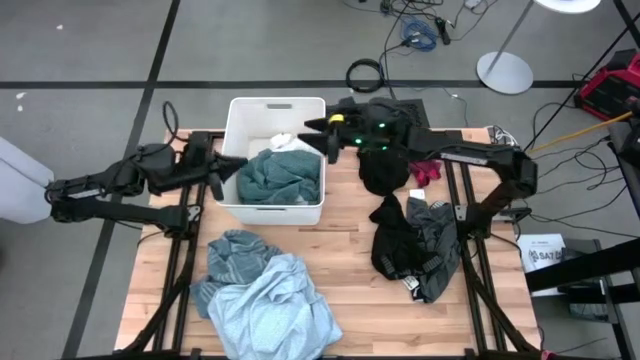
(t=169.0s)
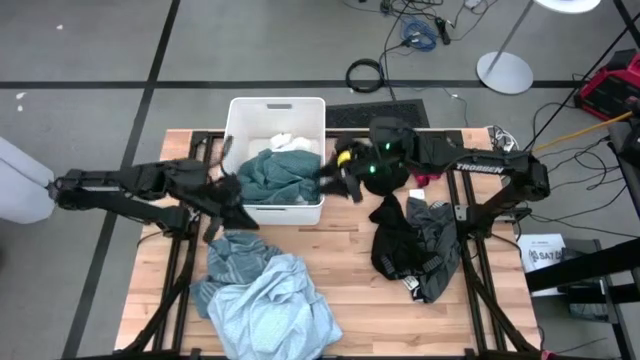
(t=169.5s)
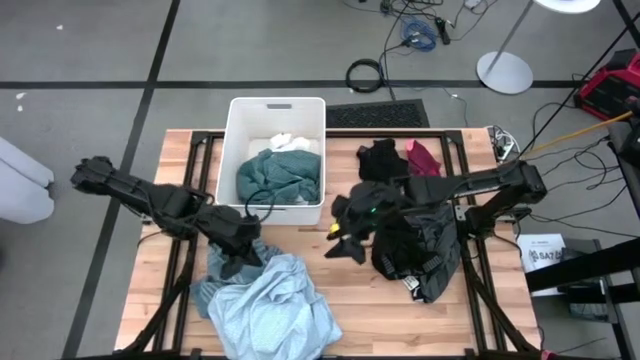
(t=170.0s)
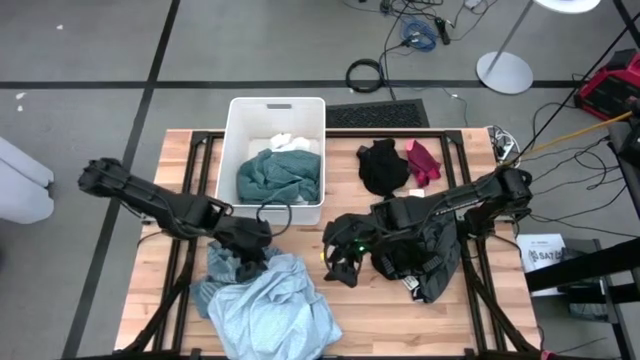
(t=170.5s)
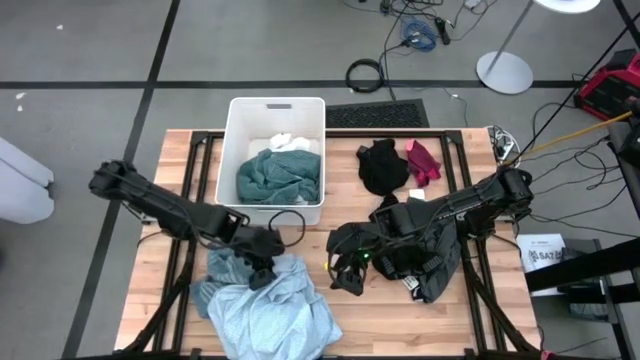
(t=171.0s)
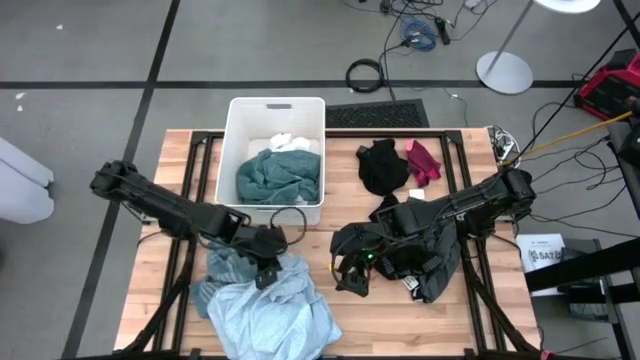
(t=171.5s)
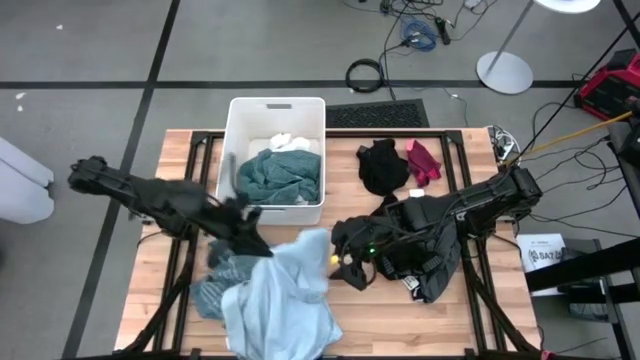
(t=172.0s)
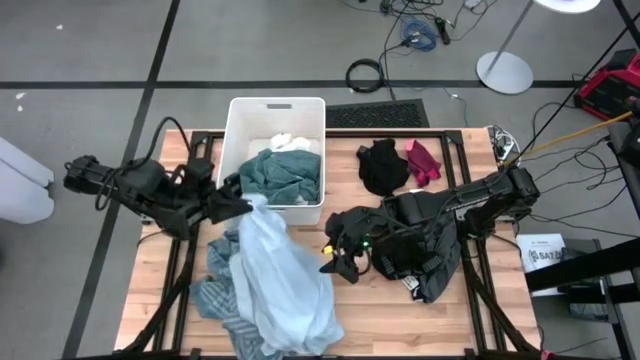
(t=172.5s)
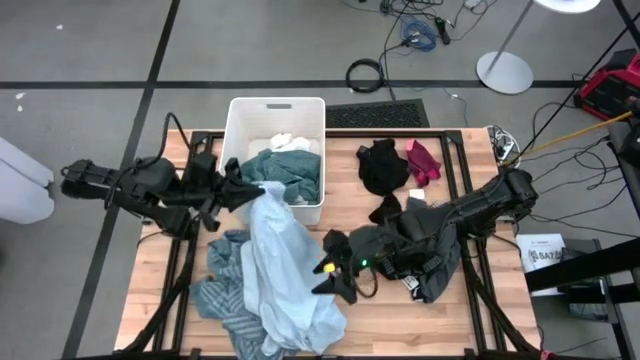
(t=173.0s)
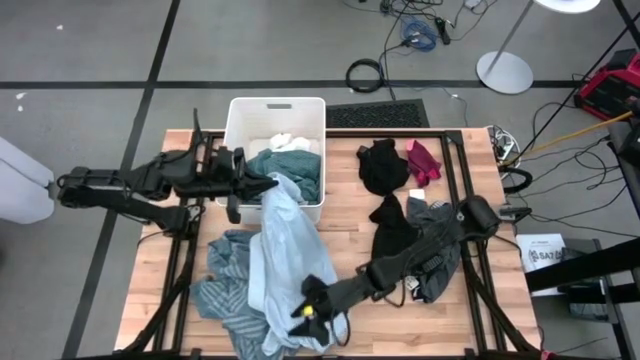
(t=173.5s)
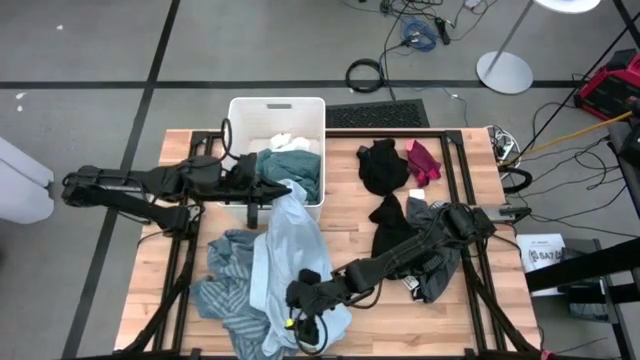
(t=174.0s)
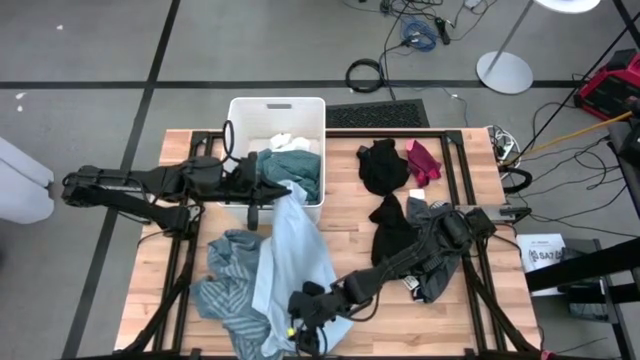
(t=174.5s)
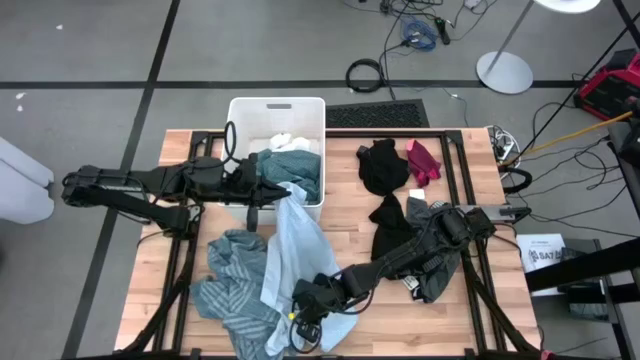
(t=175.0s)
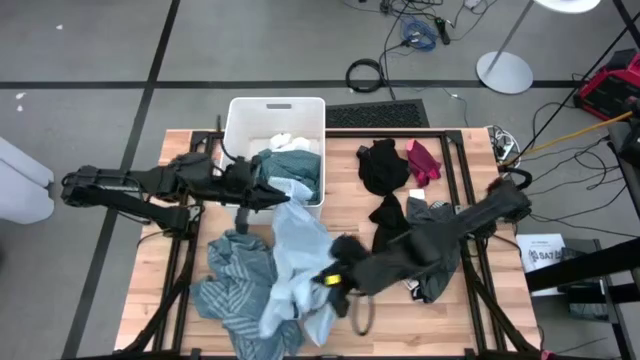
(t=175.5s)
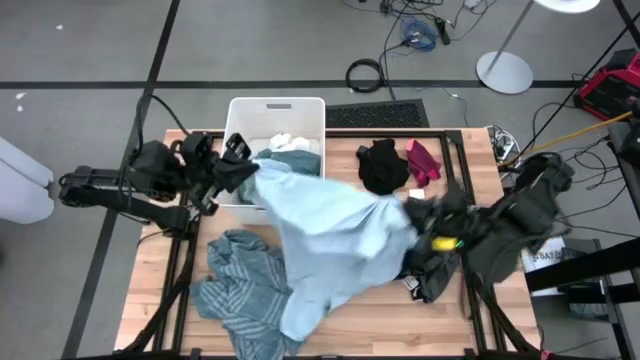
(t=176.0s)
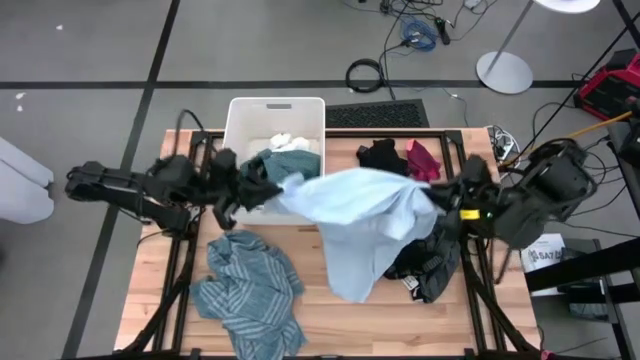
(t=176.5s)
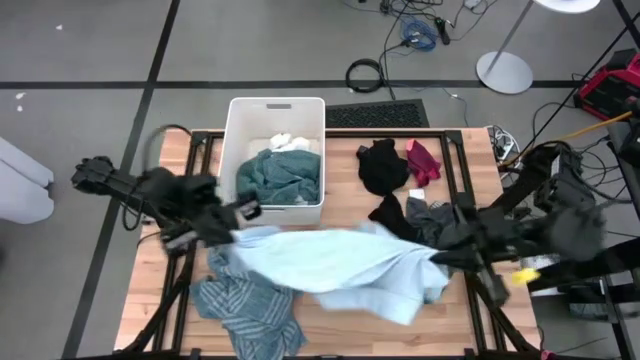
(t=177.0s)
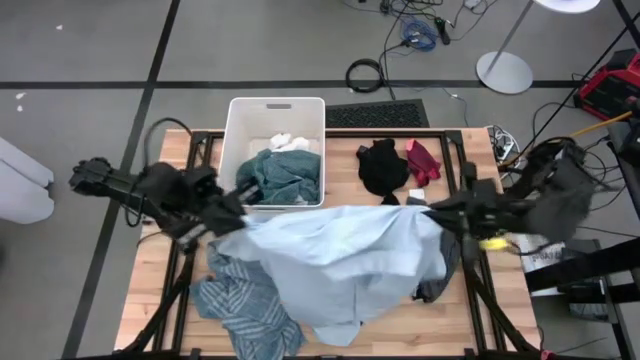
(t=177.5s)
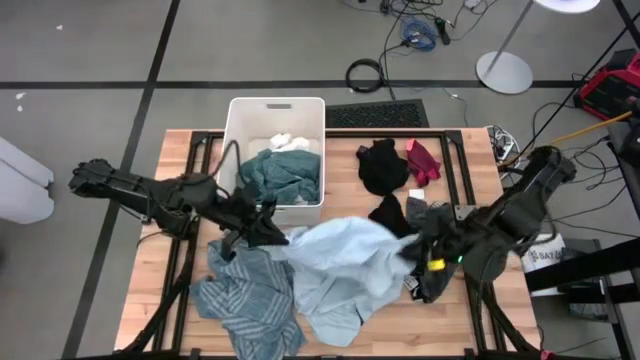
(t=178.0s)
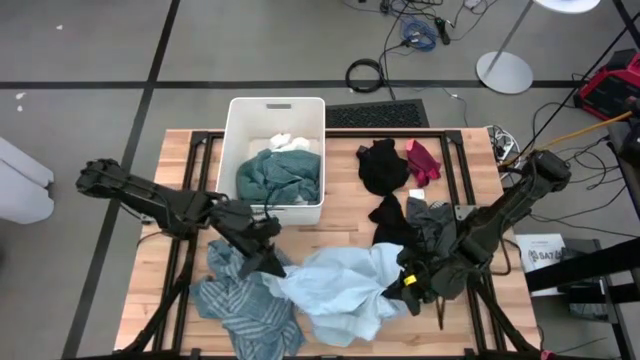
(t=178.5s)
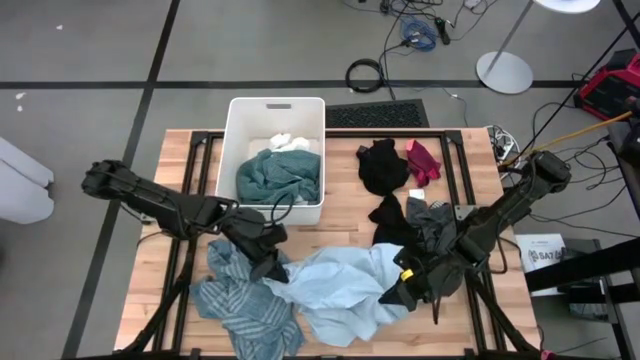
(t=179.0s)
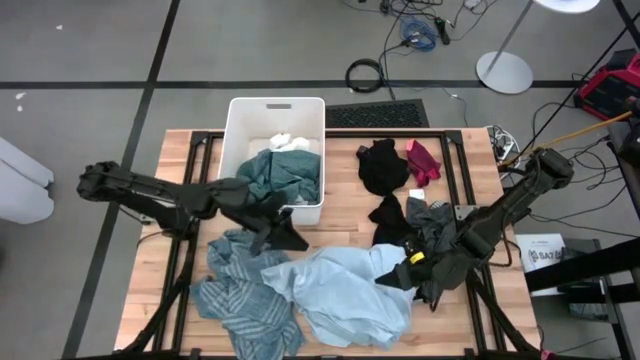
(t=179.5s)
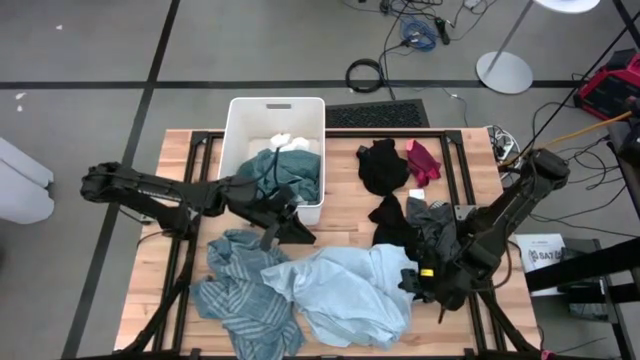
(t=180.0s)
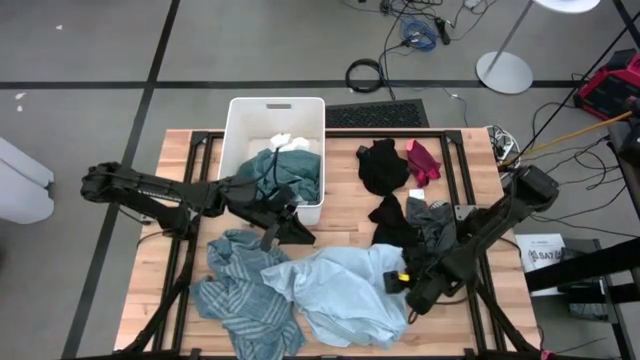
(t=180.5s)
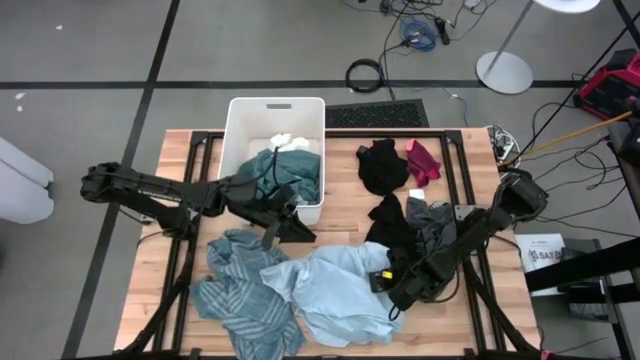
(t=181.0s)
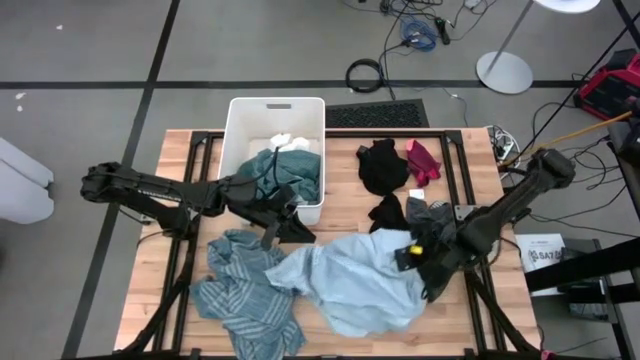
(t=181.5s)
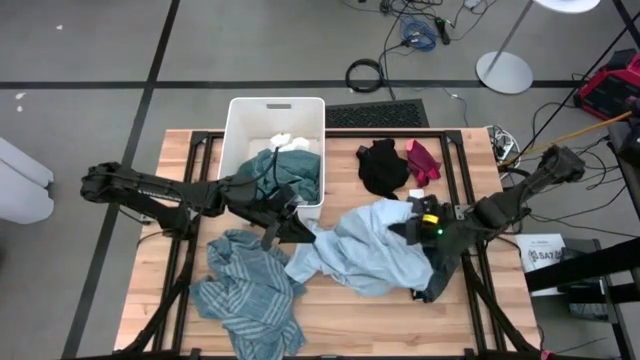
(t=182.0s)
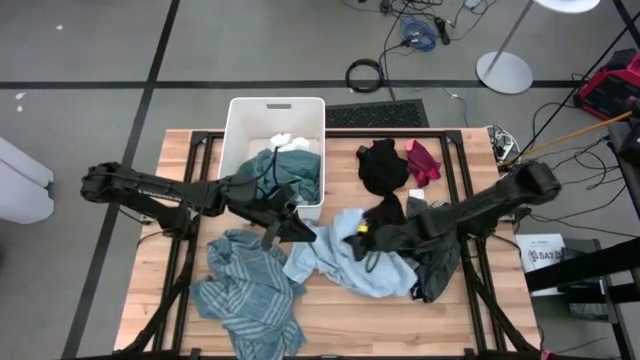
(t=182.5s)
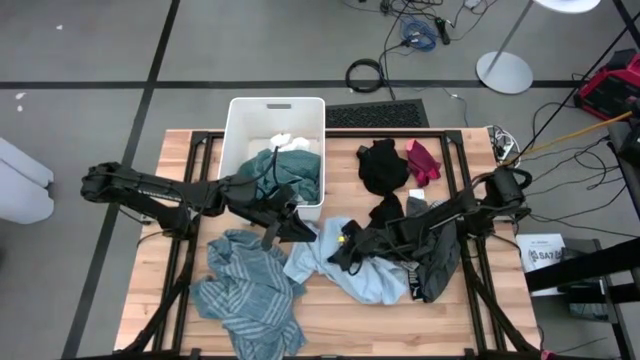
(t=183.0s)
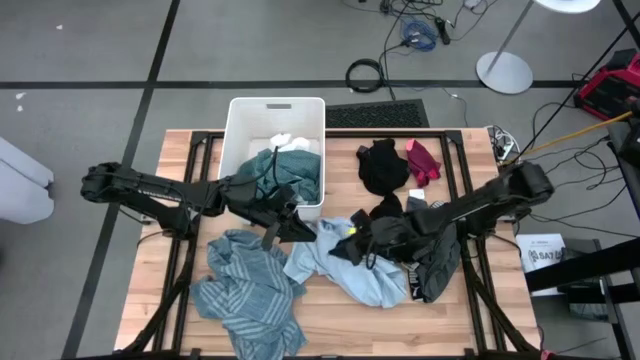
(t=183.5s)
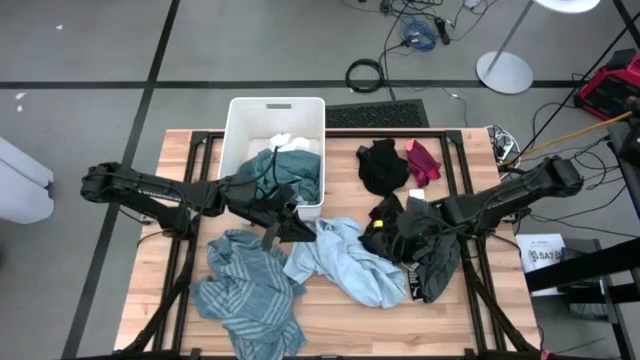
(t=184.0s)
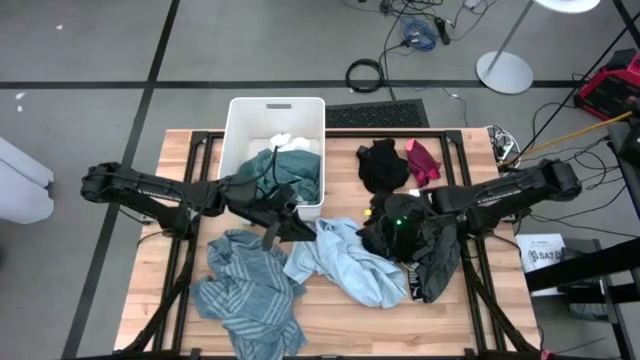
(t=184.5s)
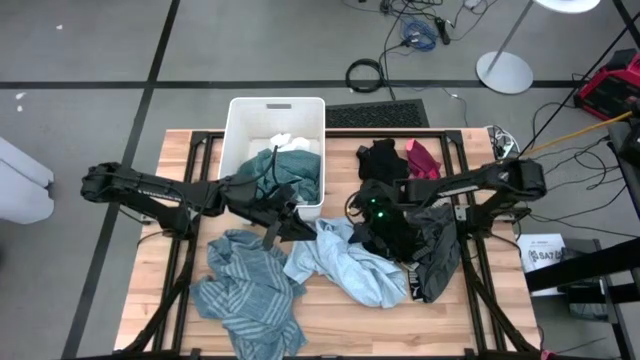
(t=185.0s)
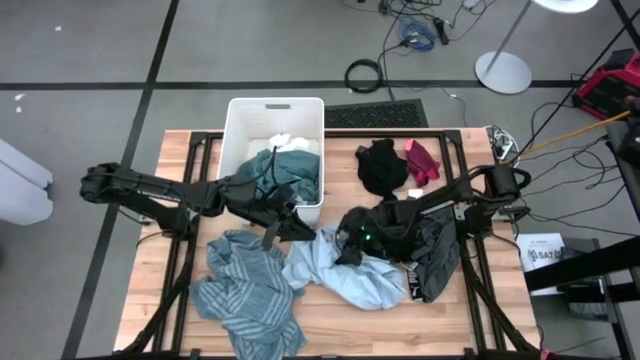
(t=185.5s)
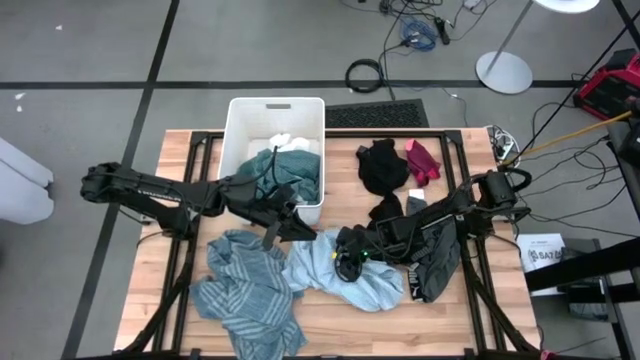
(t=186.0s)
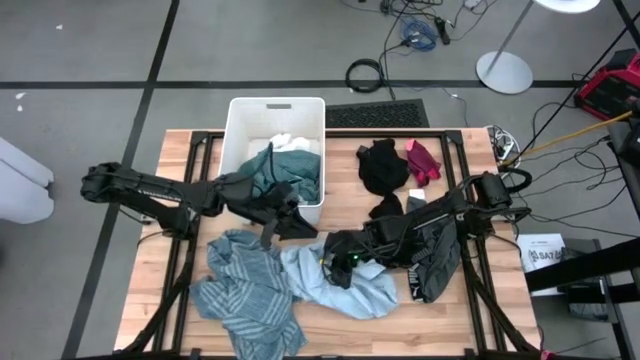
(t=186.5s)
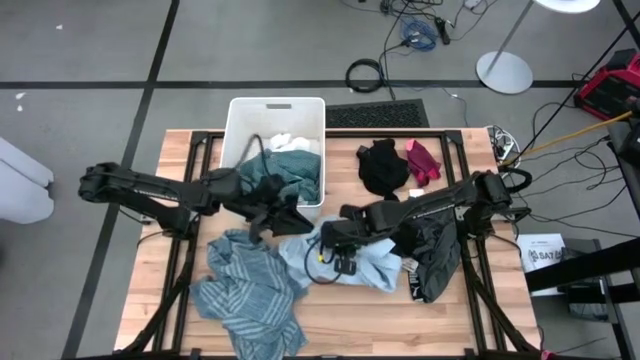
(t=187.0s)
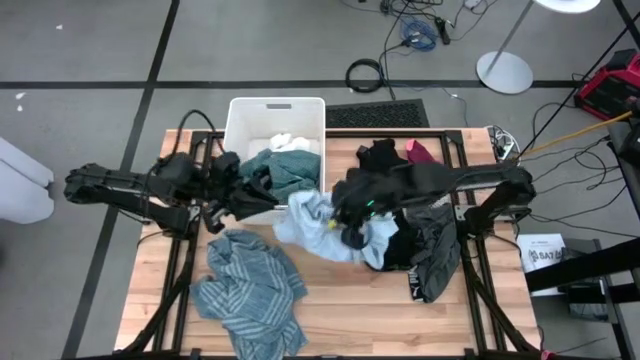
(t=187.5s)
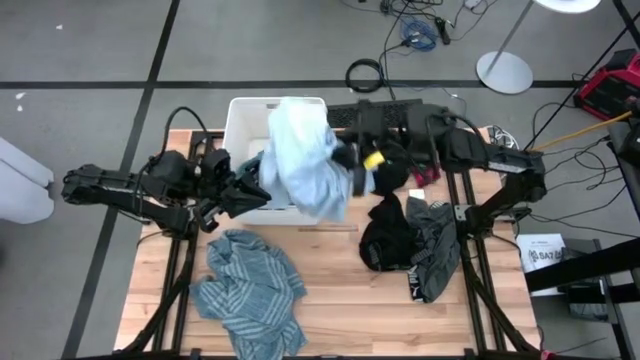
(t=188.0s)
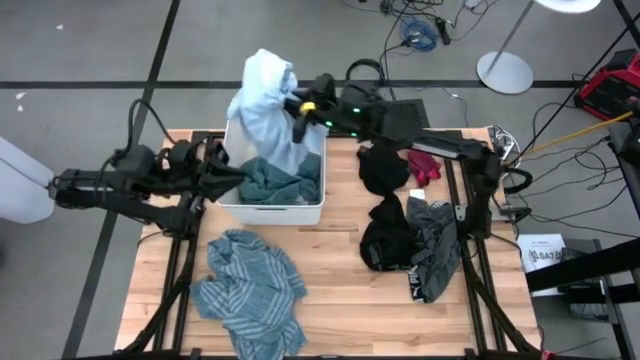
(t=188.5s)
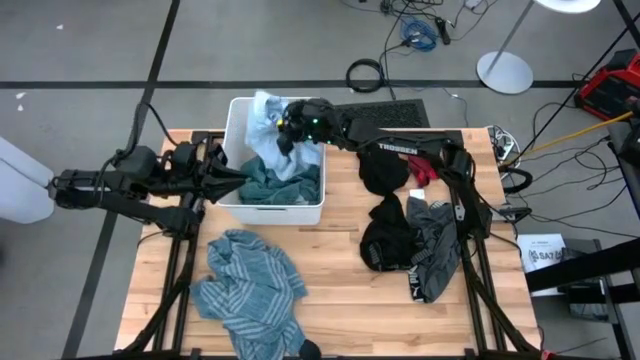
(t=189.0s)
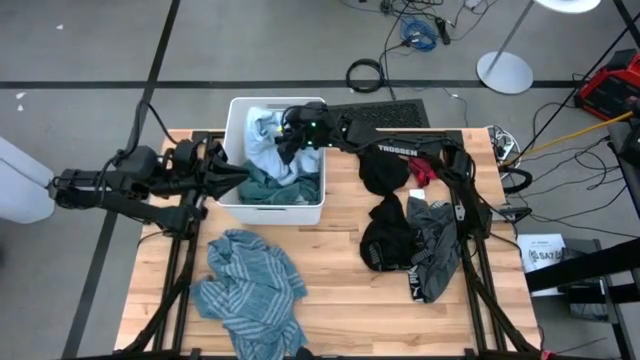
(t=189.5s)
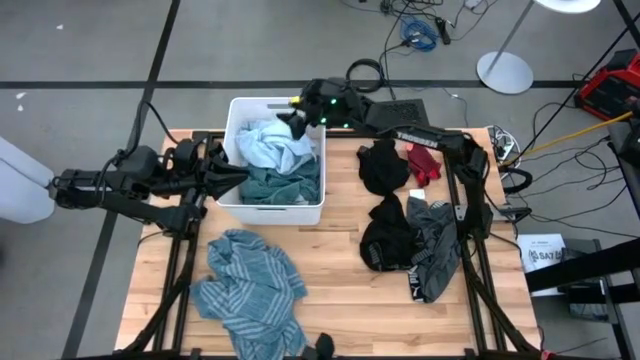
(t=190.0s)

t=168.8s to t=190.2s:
Task: Sort clothes
Put the gray and white shirt into the white laundry organizer
